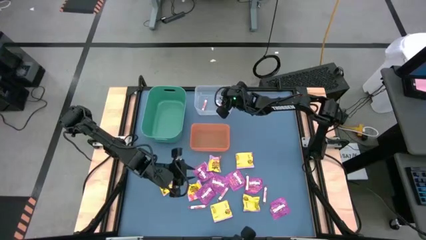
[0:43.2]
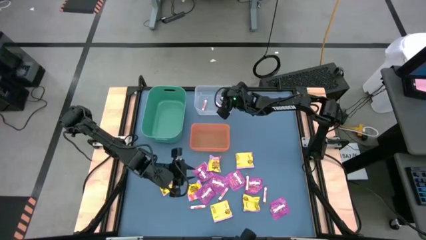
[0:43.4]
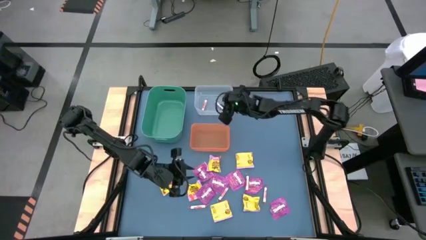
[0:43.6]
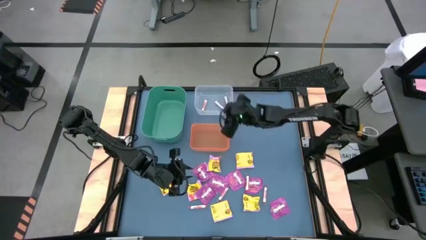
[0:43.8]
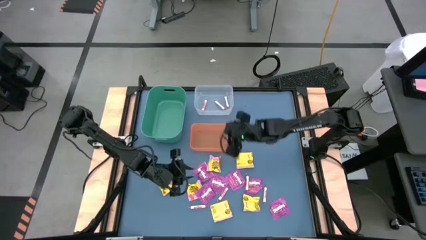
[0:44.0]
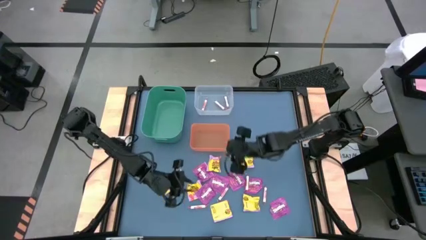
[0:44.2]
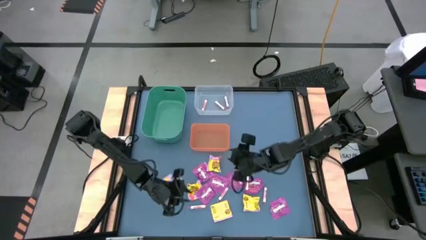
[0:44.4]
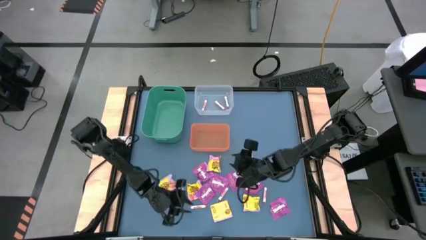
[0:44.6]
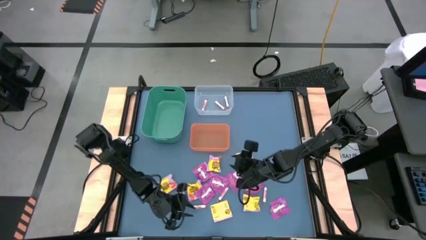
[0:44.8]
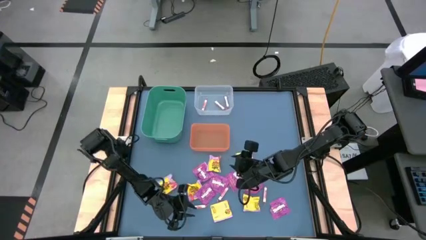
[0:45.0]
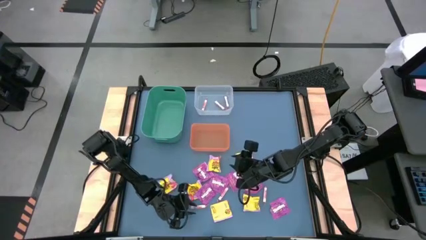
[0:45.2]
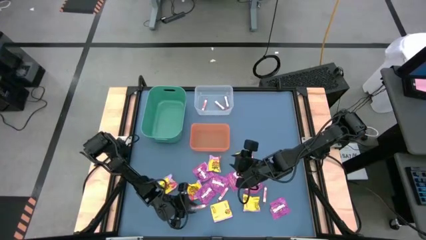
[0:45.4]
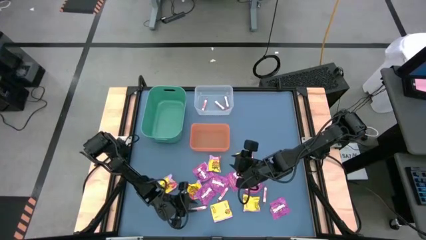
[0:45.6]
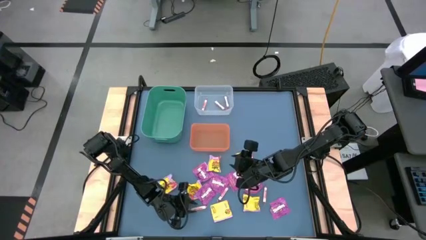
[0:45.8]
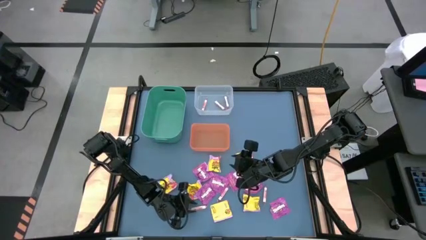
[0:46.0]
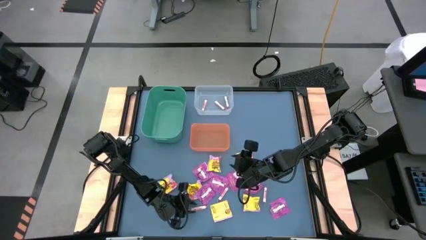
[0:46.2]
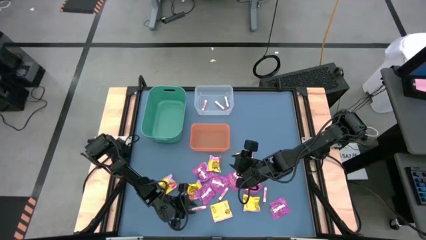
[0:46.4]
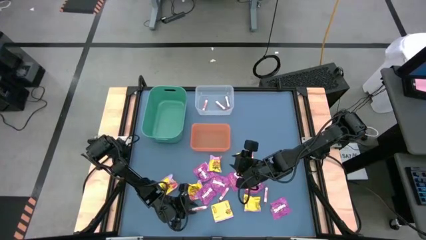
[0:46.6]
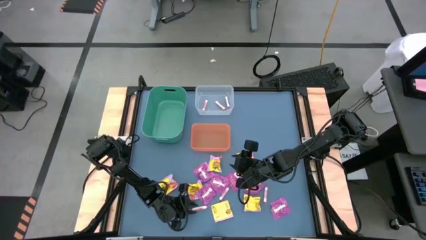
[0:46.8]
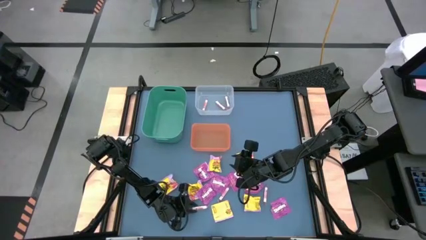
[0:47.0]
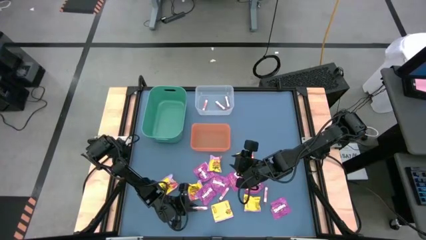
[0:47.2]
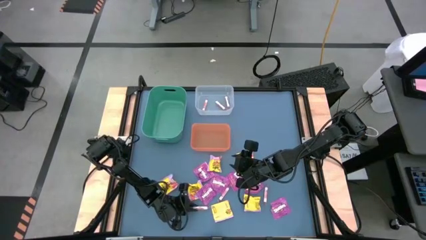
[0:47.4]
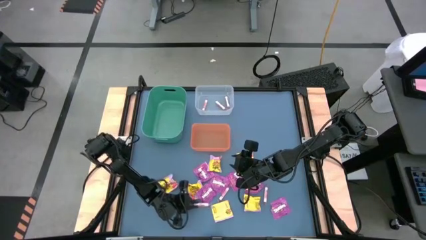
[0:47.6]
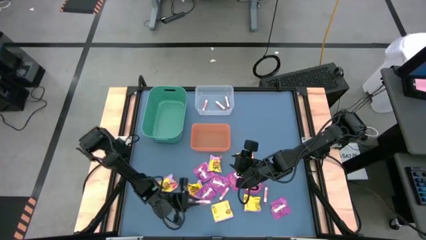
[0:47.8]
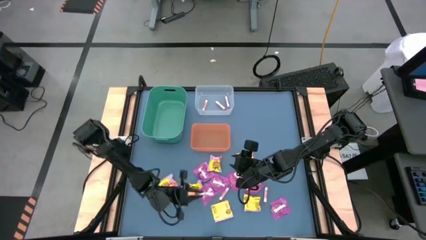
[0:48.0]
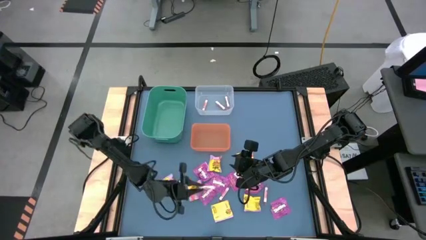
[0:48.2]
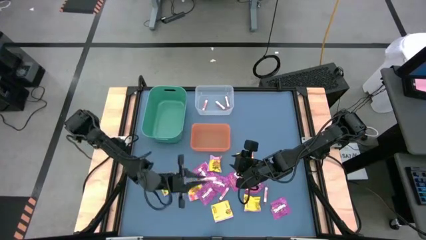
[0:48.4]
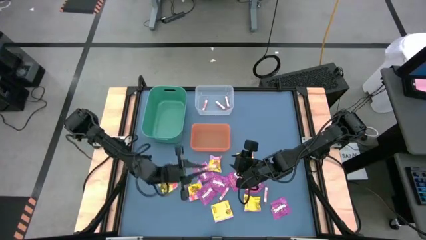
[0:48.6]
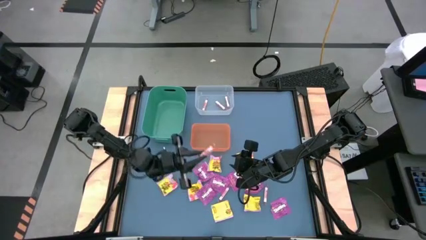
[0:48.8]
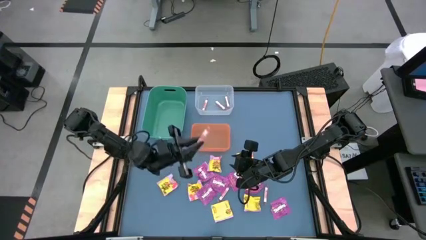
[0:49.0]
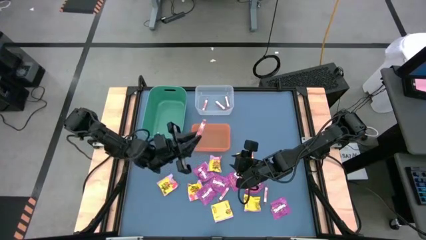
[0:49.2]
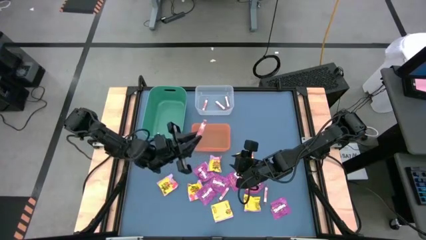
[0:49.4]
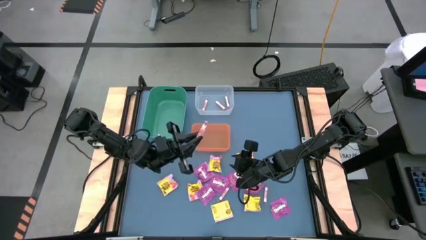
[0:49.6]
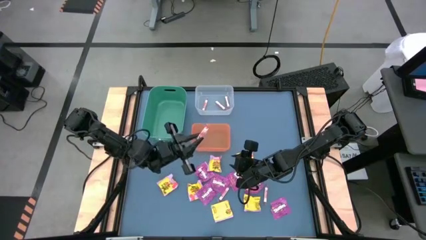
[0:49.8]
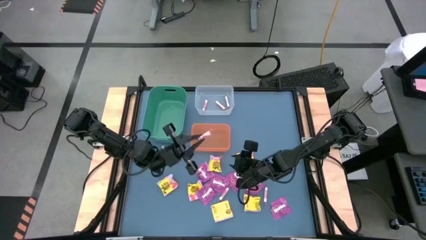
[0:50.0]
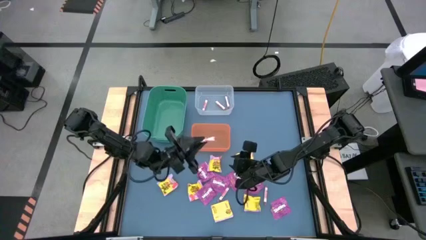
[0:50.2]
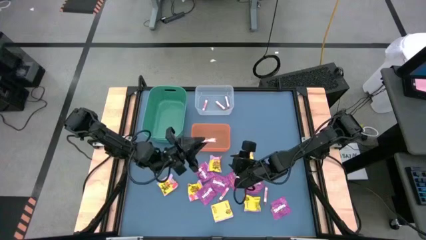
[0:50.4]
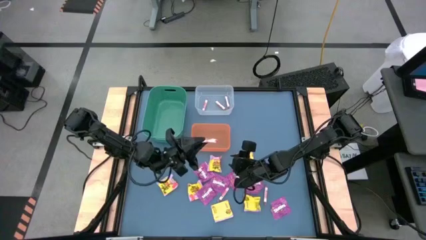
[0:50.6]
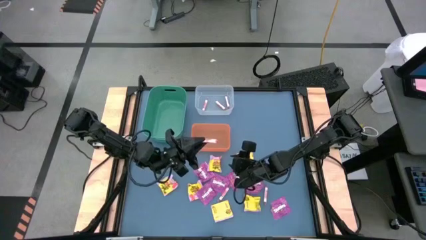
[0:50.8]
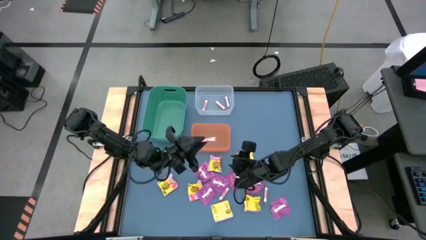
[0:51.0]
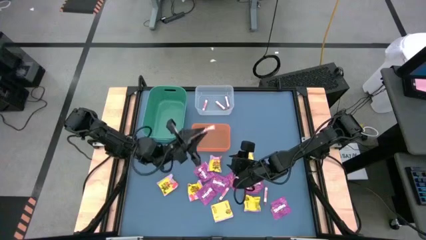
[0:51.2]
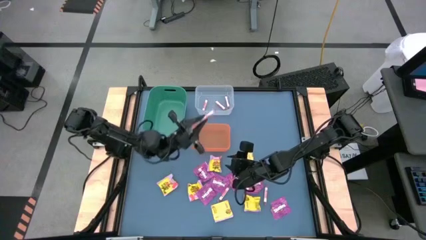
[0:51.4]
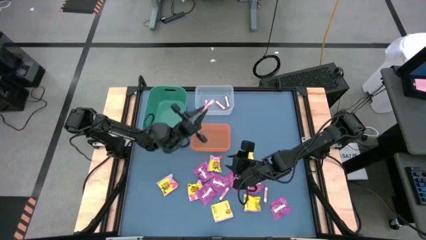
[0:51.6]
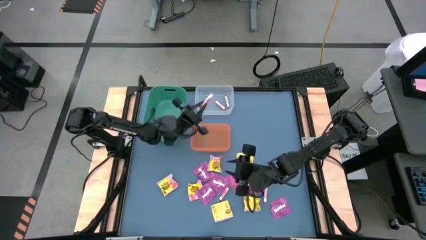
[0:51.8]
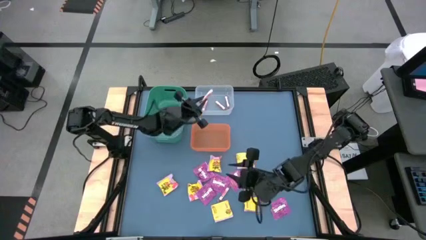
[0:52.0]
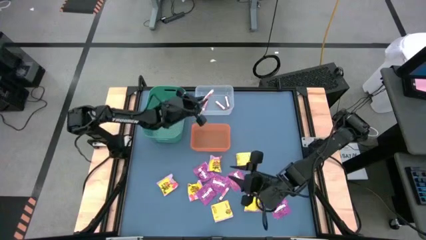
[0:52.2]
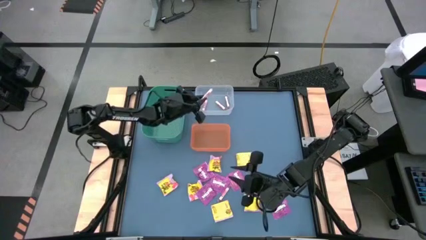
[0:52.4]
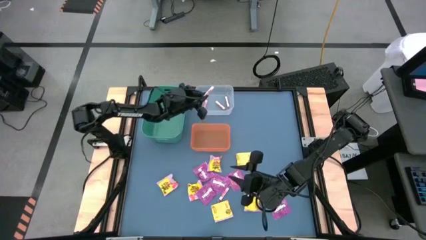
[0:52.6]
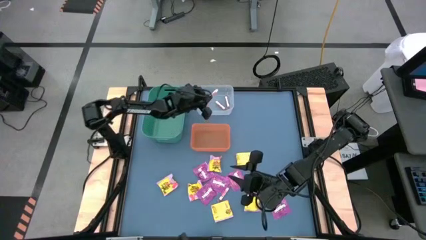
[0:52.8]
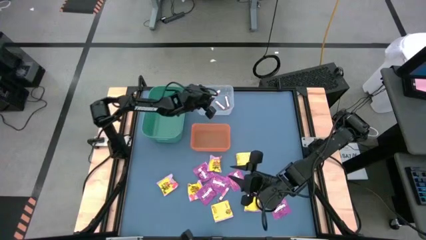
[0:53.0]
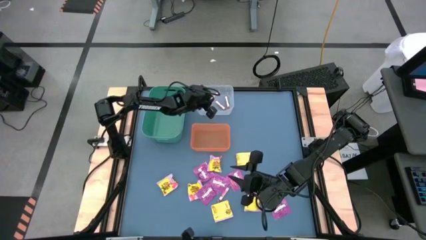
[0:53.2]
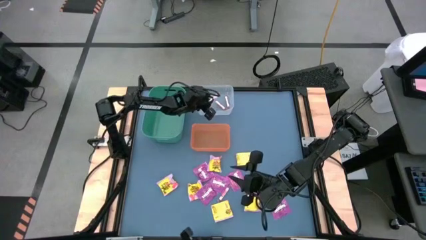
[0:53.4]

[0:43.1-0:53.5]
Task: Sort candy
Put the white candy into the transparent bin

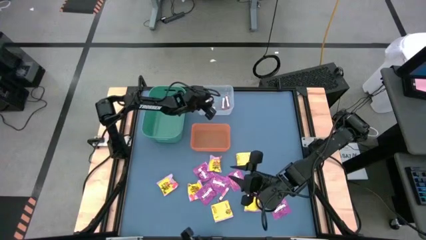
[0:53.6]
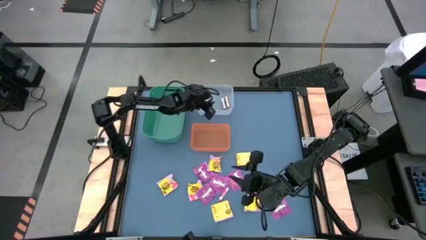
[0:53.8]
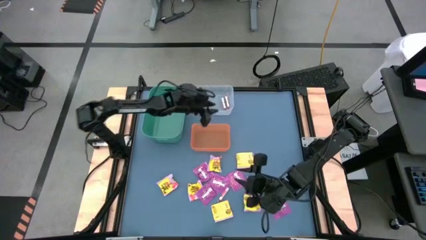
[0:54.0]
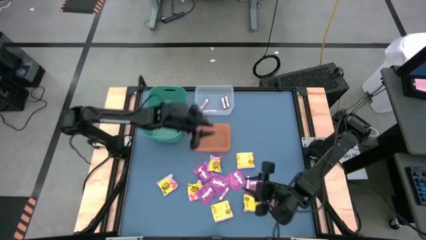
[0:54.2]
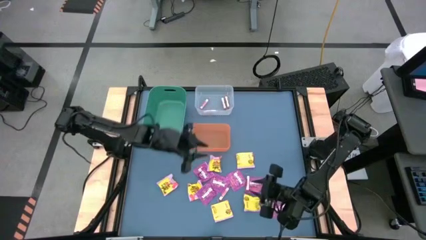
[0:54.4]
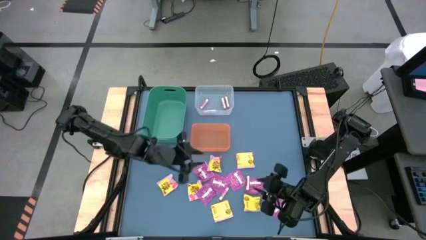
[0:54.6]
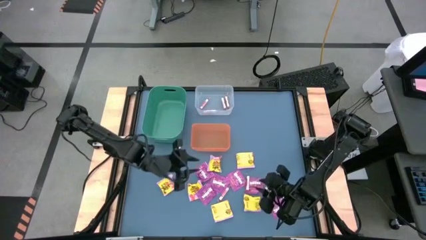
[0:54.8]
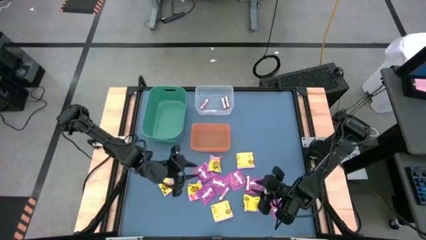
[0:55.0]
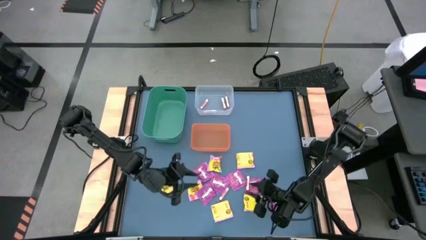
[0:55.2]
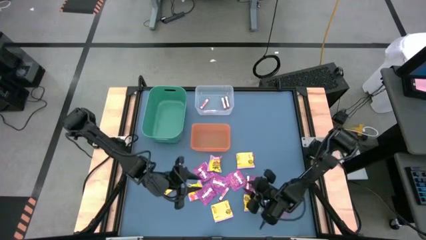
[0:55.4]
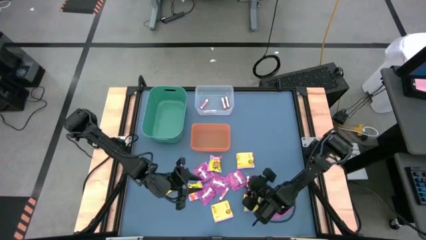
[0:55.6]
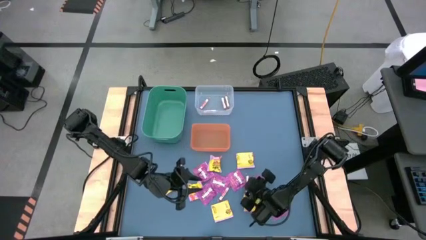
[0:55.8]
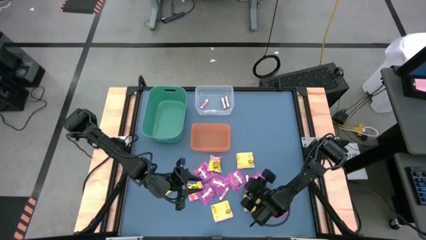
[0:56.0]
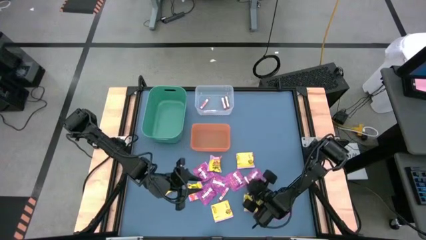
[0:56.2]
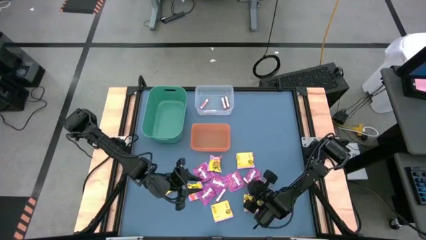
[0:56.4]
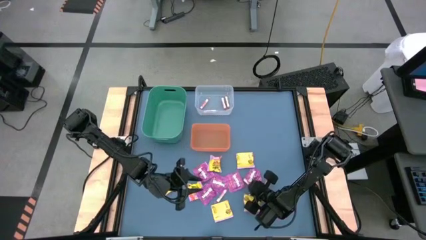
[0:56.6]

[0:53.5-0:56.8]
Put the white candy into the transparent bin

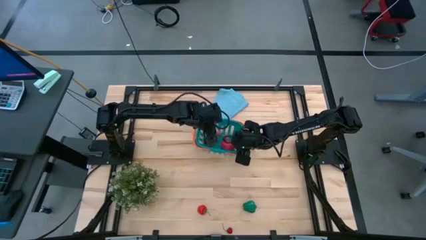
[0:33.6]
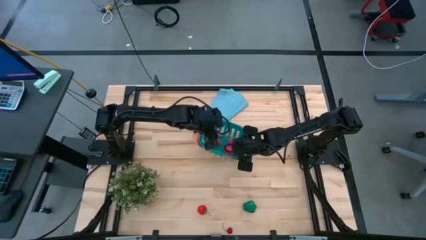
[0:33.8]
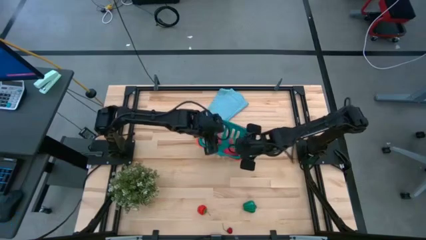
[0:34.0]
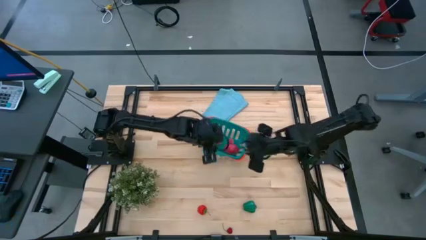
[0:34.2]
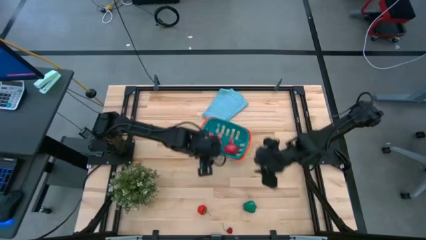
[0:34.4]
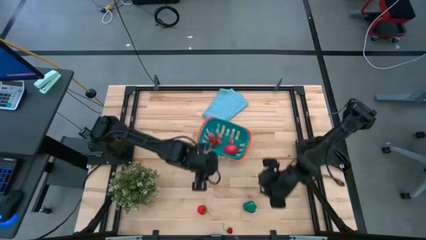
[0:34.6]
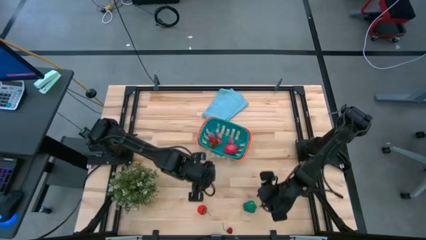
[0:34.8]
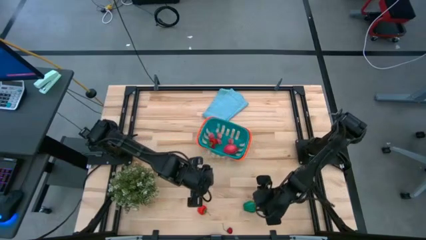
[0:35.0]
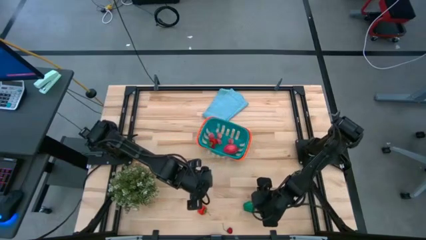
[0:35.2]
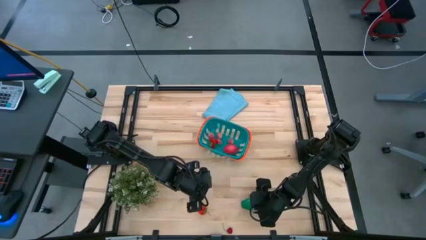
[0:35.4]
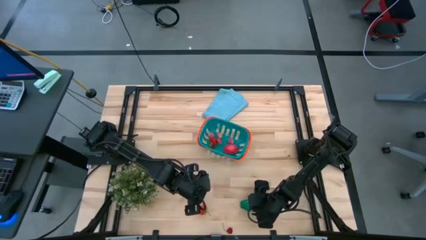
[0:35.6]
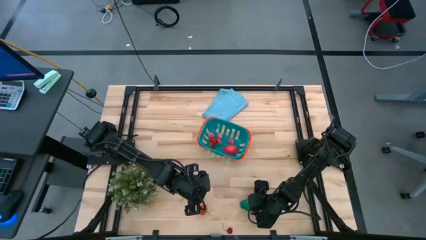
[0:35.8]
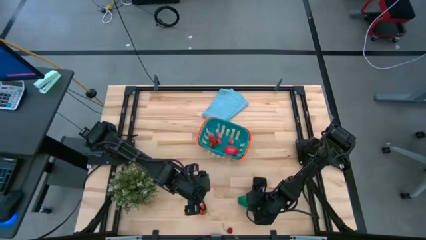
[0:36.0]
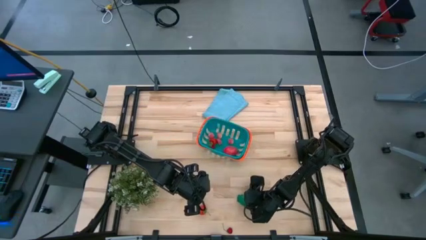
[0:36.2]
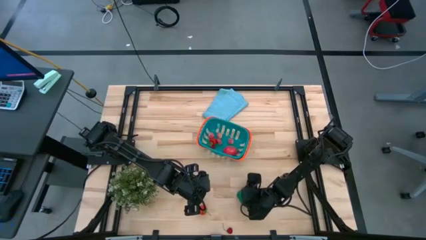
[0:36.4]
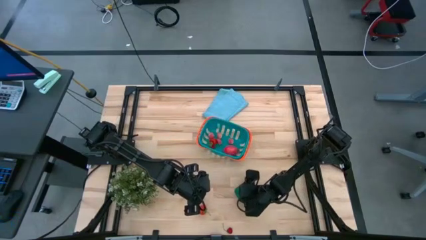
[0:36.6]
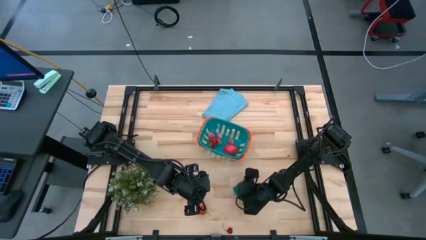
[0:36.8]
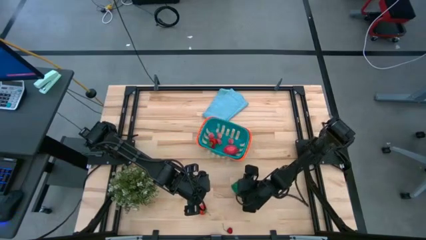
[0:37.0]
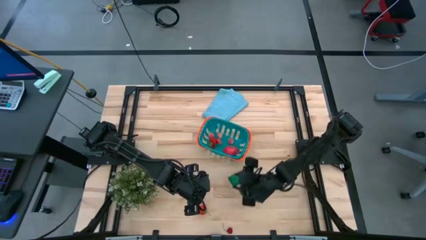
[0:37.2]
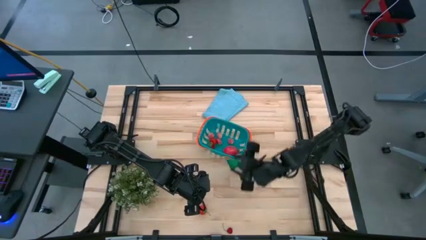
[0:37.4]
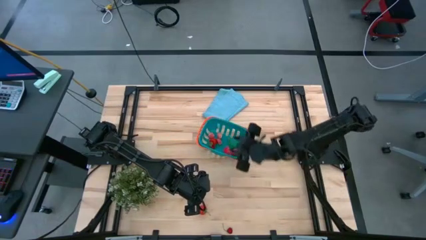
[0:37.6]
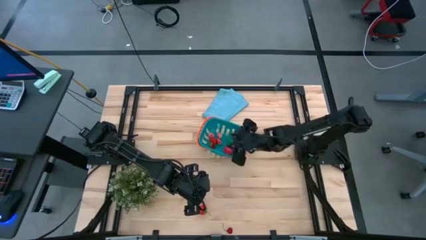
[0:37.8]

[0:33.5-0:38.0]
Task: Pick and placing Produce into tupperware
Put the green bell pepper into the bin
